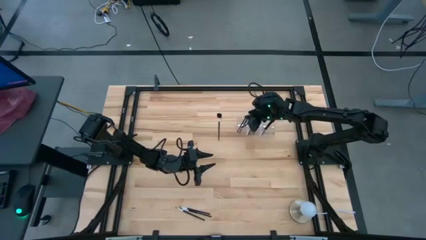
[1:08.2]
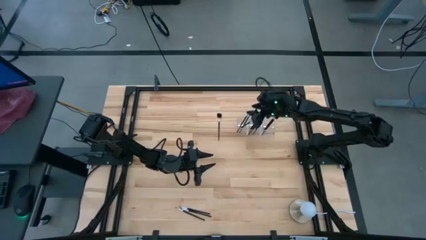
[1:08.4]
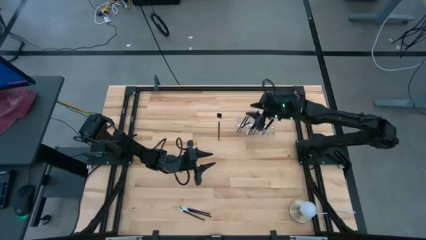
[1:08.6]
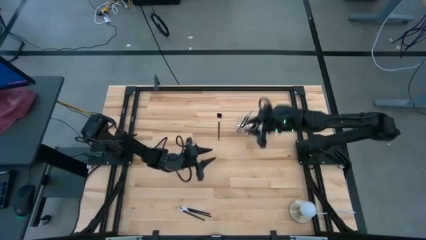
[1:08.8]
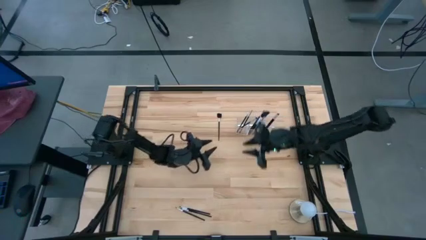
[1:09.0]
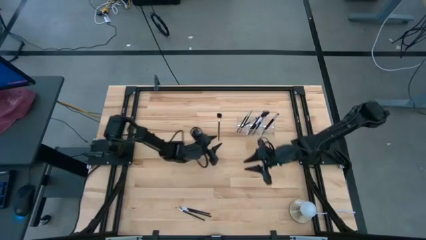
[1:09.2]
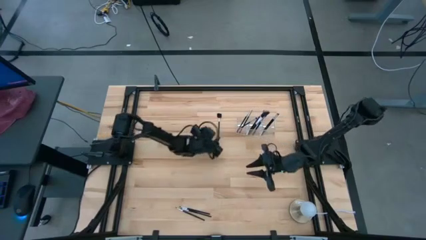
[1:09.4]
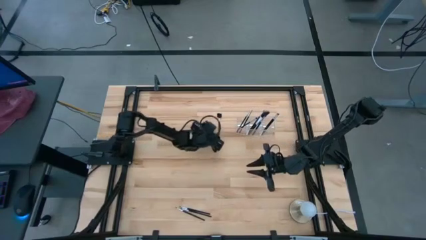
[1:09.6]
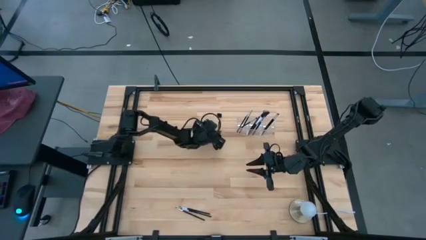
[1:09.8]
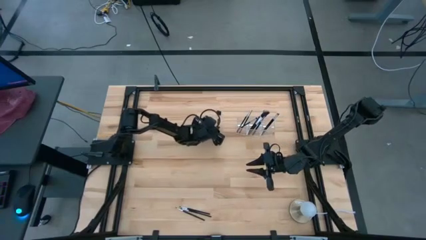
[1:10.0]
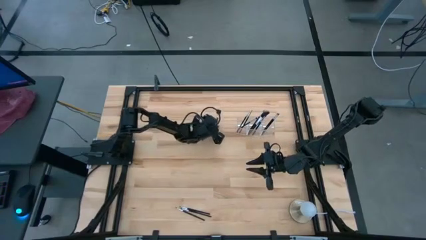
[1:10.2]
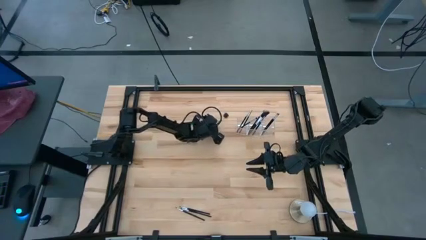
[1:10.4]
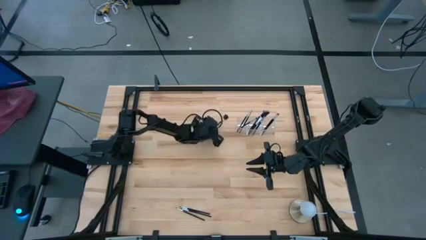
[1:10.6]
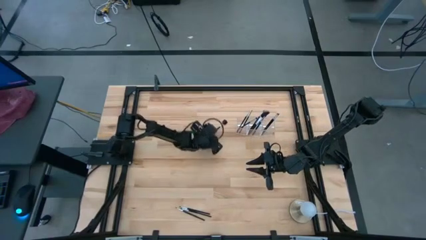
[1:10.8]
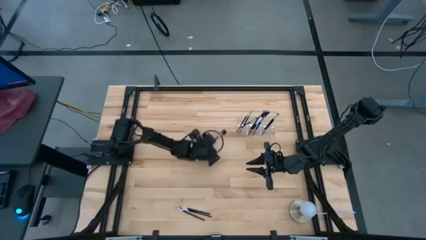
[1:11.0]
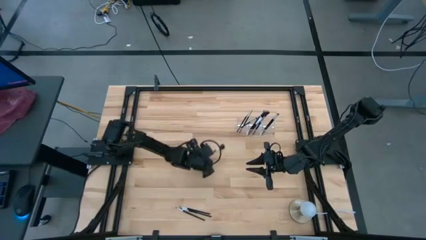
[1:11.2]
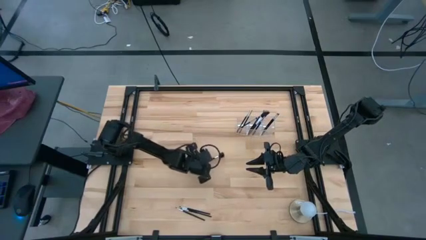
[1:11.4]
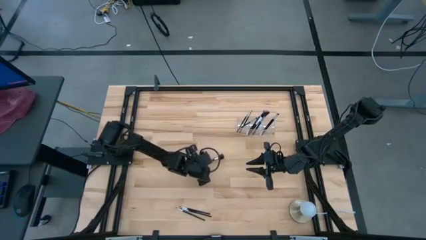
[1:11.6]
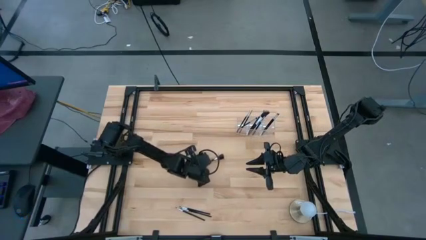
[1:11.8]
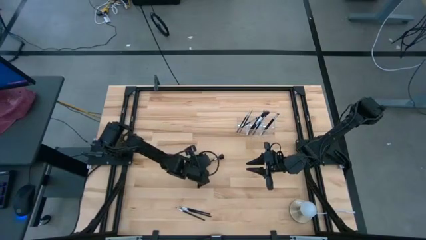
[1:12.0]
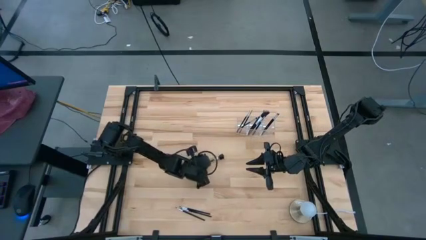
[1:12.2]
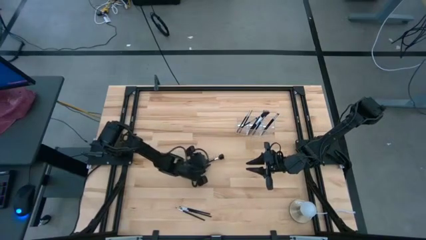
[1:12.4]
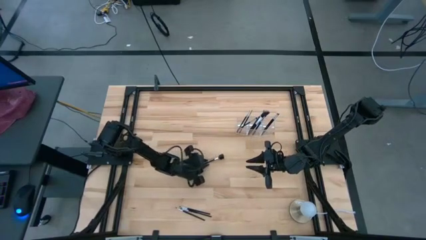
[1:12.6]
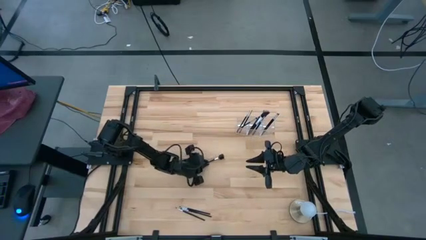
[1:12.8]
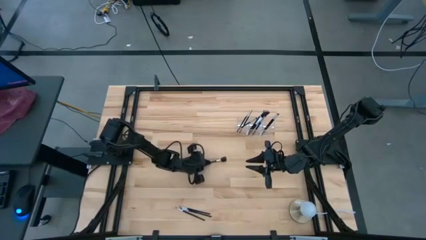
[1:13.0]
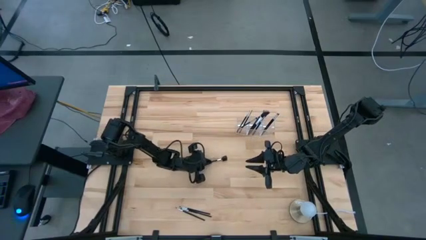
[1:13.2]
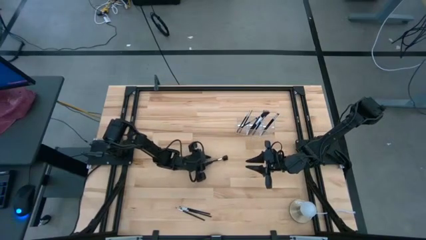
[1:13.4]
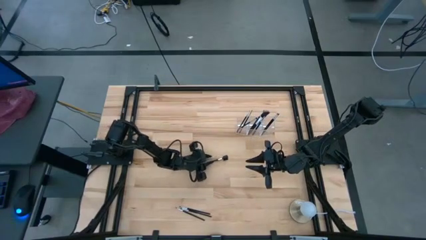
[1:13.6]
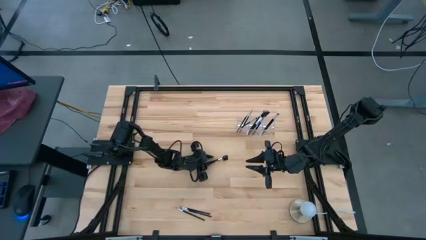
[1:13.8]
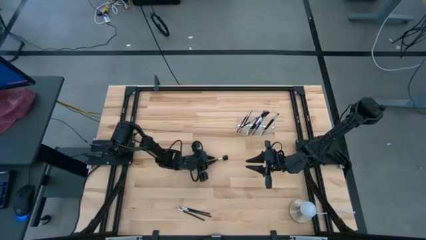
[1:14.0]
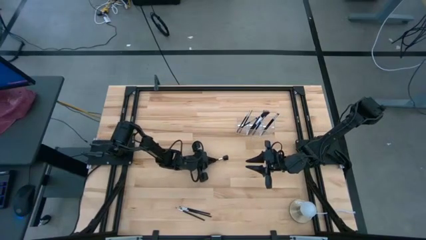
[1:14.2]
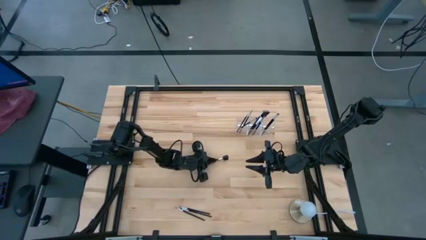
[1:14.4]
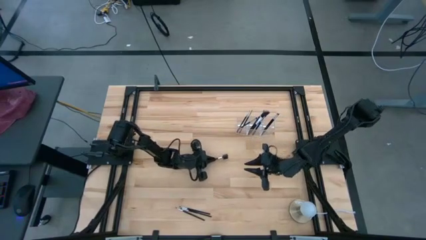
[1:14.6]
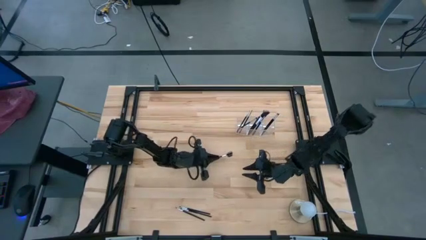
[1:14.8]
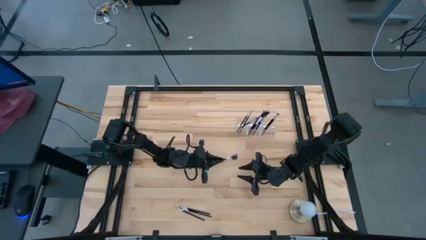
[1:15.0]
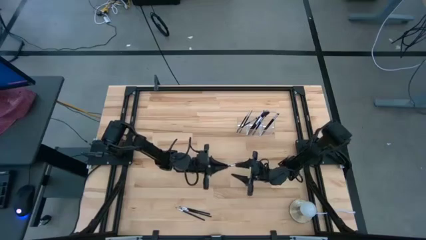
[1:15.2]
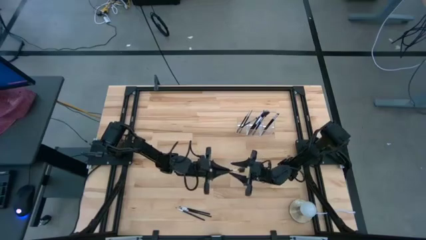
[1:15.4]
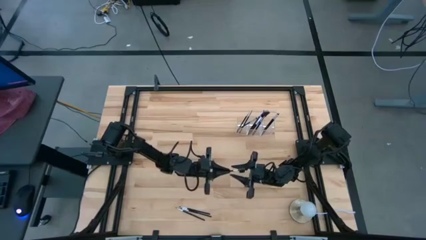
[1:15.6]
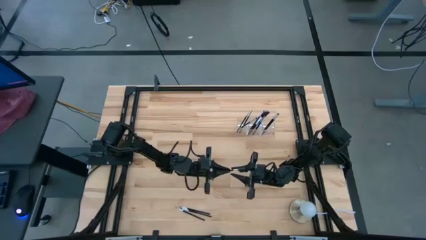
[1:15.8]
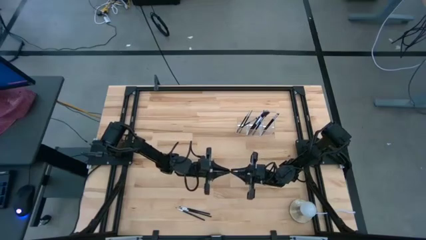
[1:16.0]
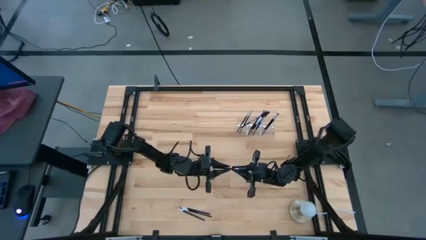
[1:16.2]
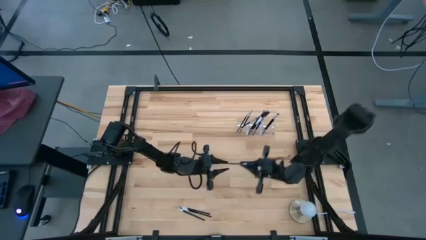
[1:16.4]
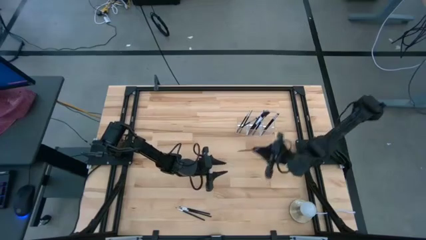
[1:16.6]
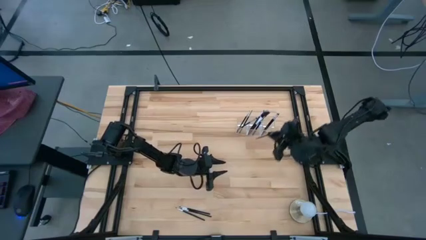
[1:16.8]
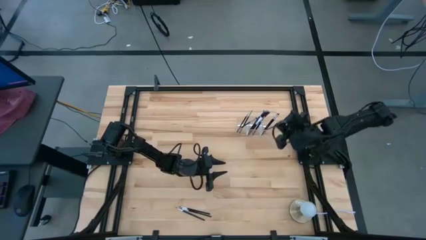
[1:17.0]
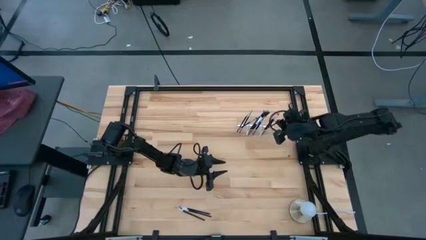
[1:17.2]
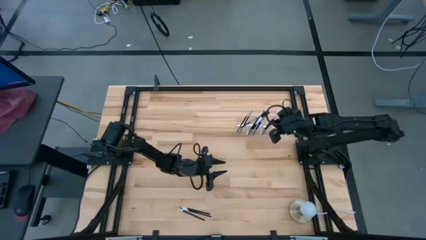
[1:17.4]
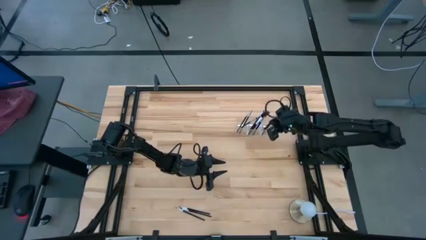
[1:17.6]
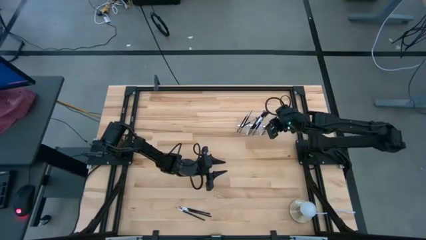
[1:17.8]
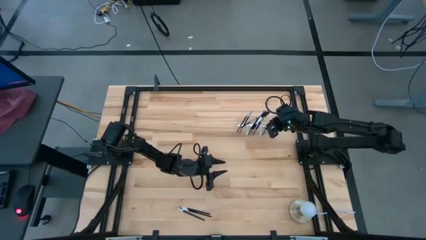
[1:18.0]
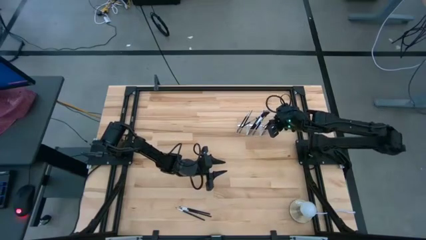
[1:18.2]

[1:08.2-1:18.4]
Task: Put items in baskets/containers
Put the black brow brush into the transparent organizer

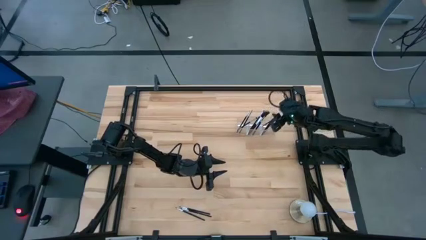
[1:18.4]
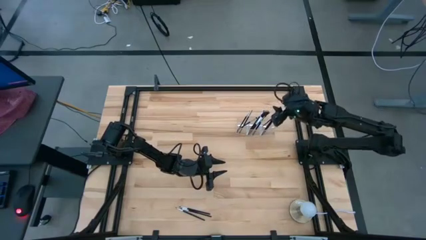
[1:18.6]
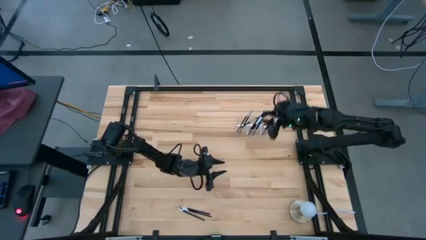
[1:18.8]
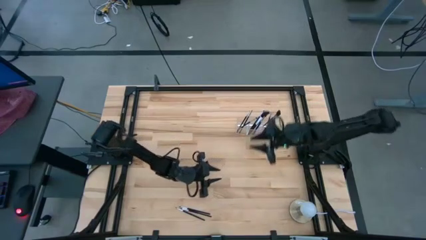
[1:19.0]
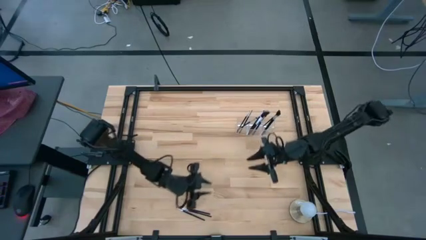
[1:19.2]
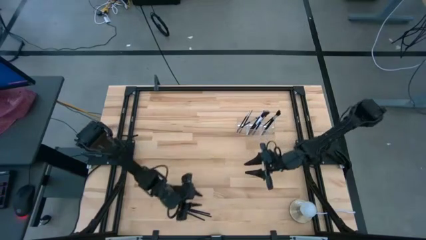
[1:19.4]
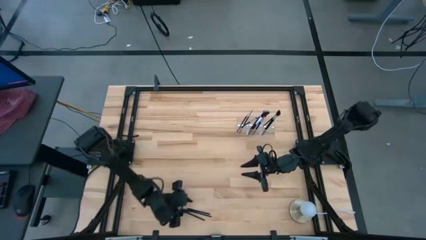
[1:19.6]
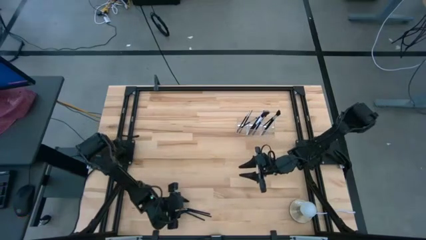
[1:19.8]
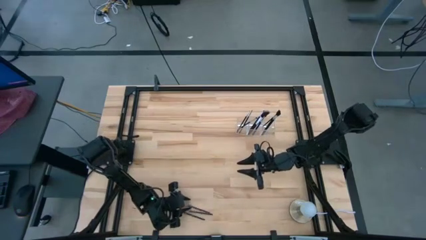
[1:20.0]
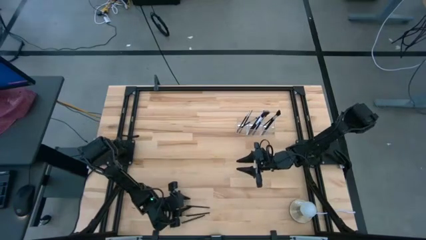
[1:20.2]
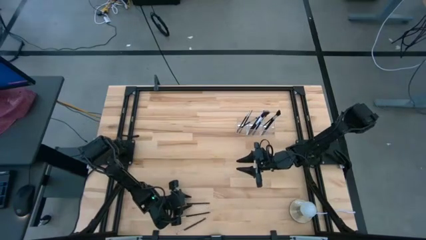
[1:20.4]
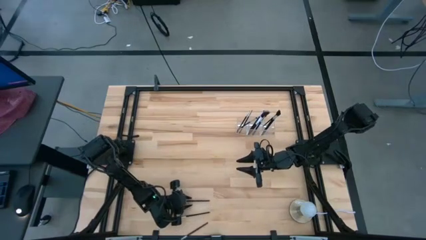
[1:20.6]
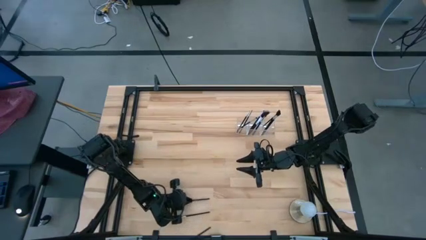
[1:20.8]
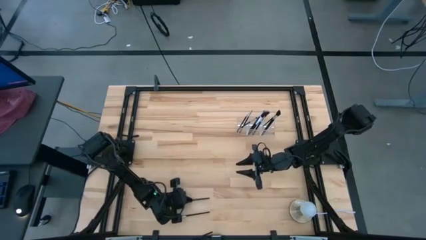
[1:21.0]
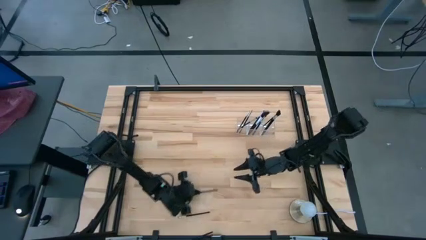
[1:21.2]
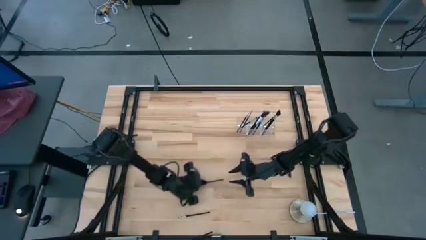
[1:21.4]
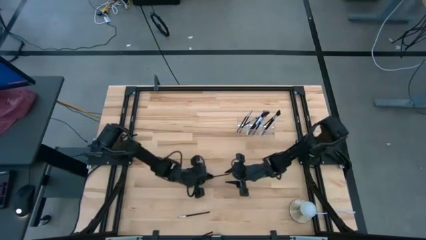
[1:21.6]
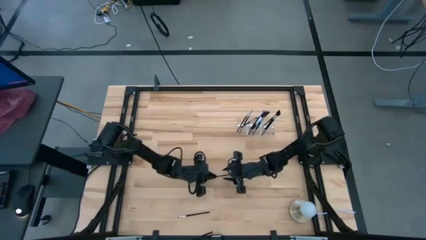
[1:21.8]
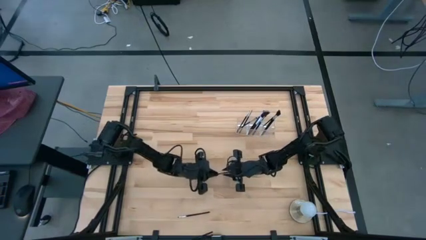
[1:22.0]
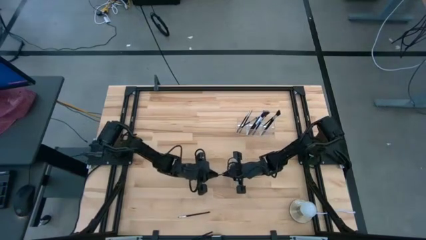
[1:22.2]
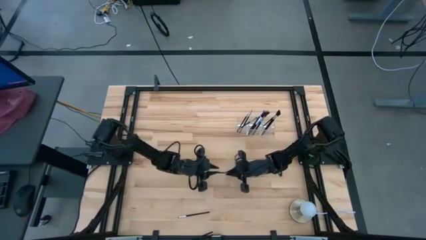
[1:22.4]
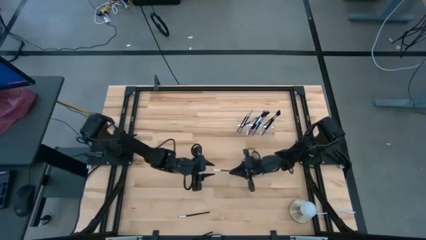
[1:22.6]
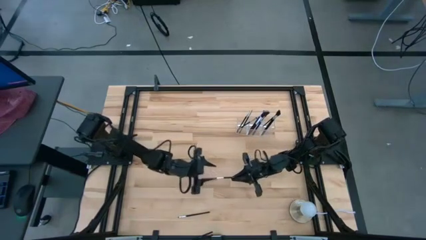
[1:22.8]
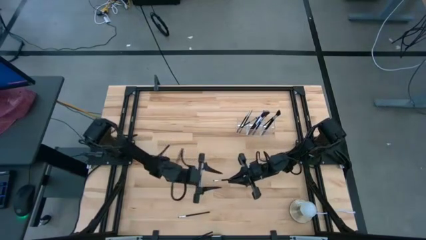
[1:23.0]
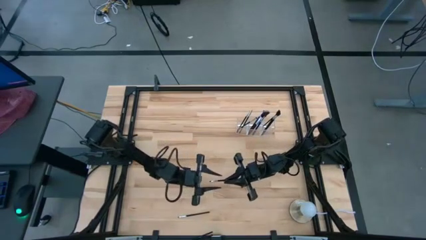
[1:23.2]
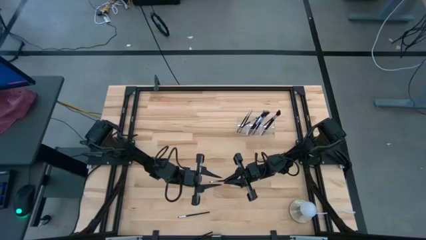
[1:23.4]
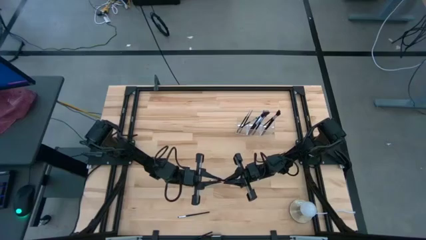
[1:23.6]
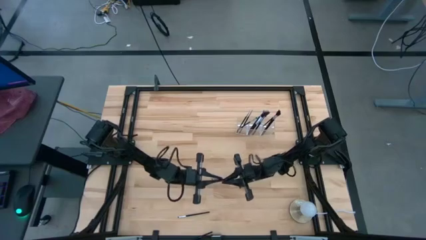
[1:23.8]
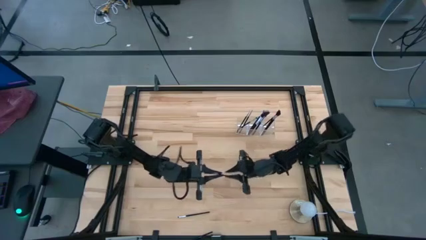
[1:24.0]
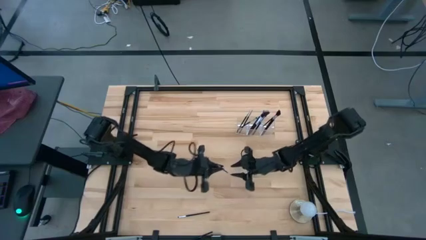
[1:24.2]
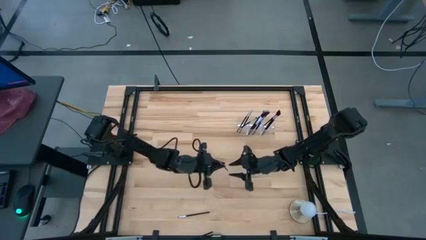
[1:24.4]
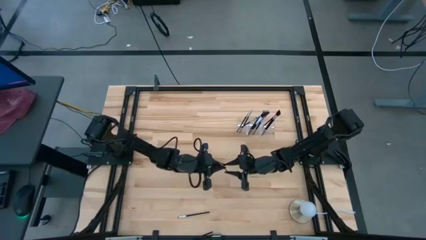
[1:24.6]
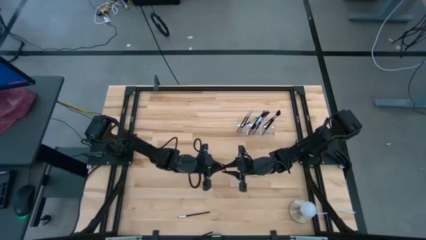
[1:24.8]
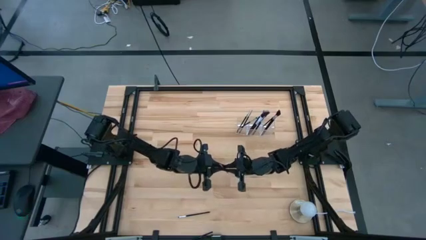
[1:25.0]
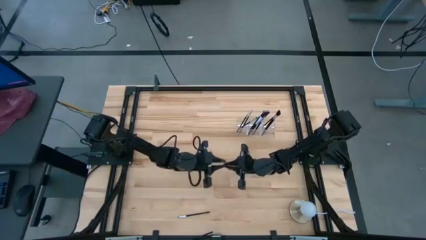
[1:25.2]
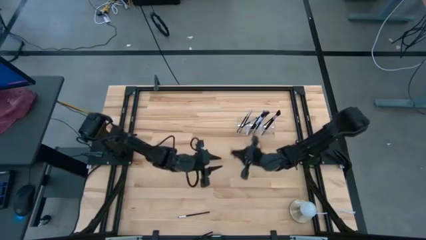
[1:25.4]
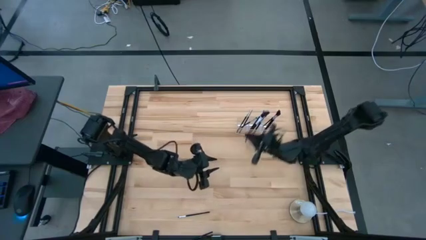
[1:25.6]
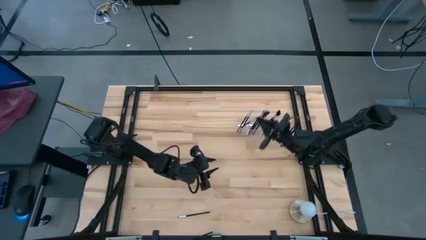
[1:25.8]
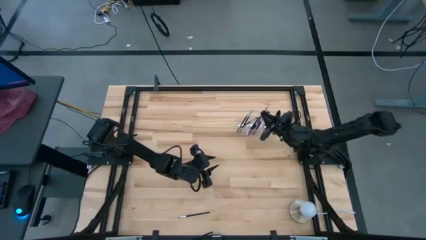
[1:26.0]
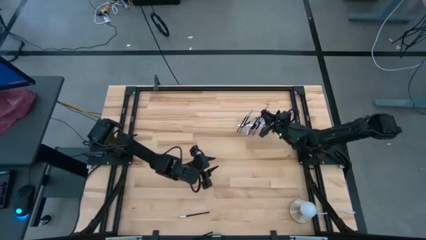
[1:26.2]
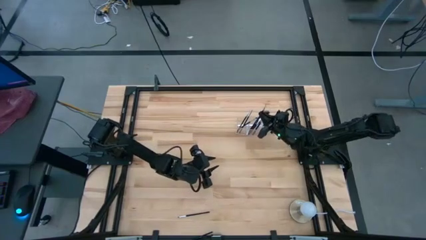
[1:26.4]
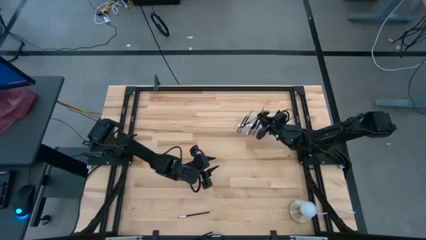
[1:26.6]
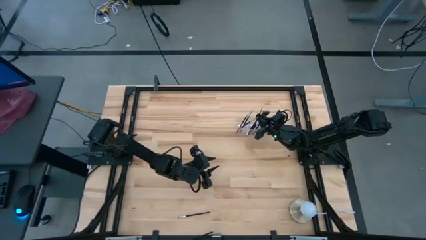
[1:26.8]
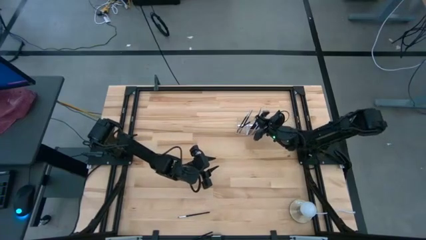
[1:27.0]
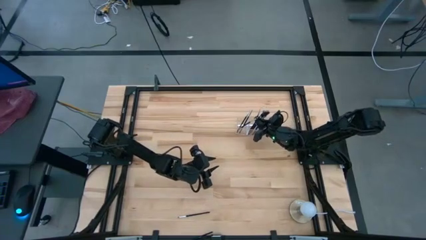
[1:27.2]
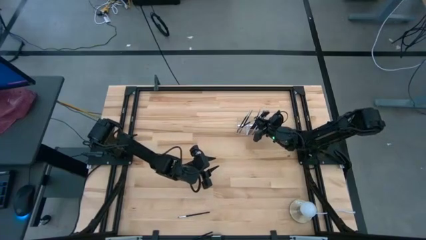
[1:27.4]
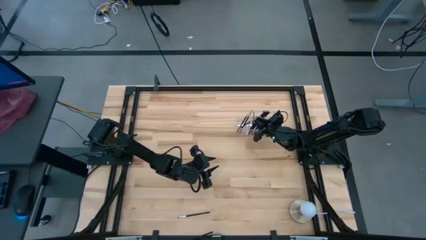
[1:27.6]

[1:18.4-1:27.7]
Put the black eyeshadow brush into the transparent organizer
